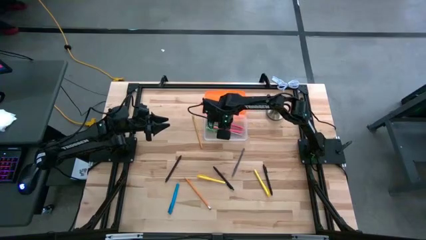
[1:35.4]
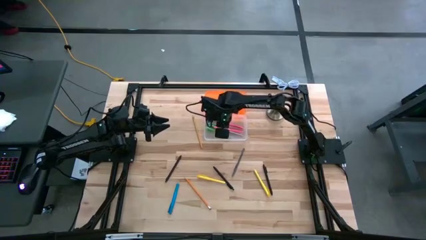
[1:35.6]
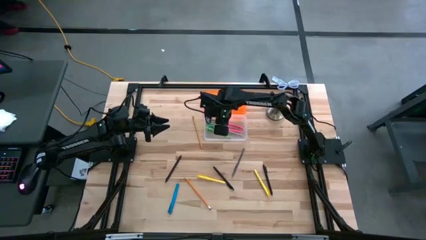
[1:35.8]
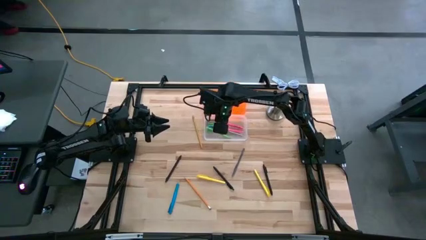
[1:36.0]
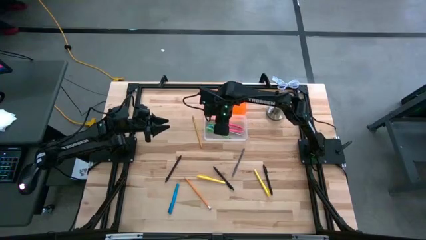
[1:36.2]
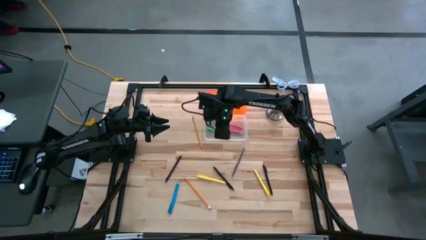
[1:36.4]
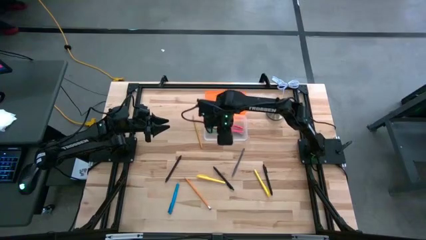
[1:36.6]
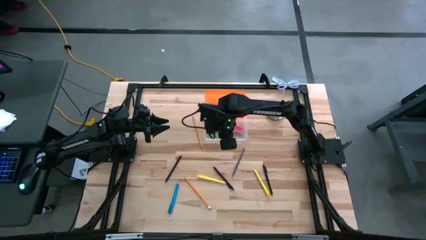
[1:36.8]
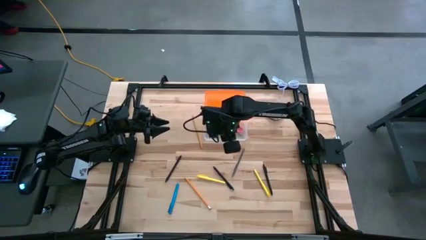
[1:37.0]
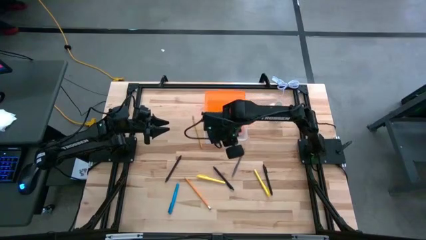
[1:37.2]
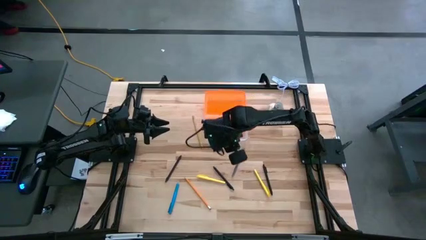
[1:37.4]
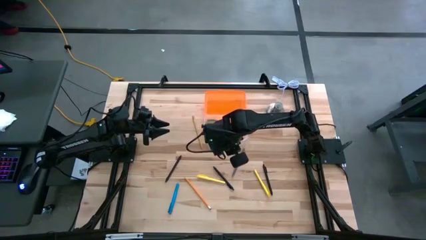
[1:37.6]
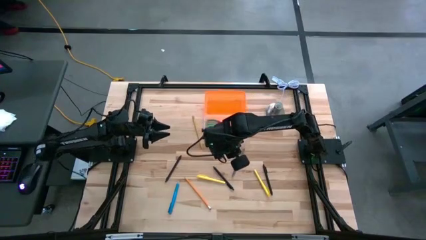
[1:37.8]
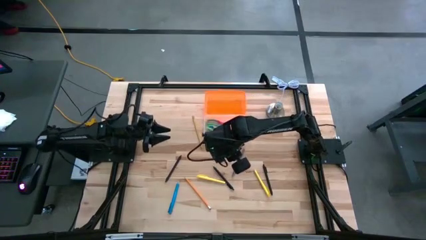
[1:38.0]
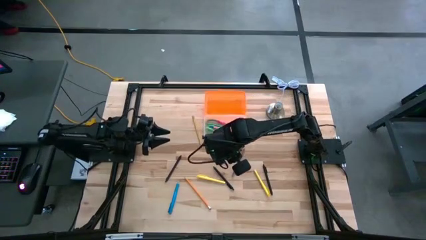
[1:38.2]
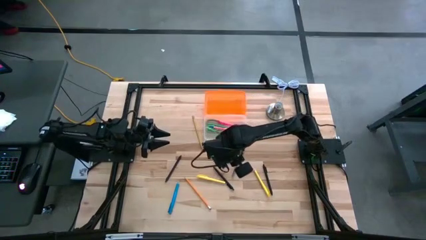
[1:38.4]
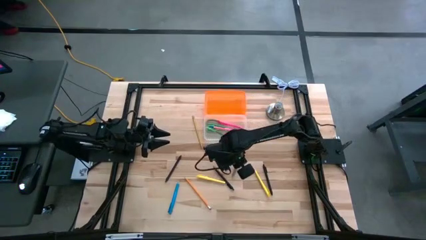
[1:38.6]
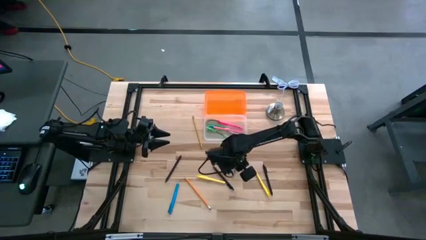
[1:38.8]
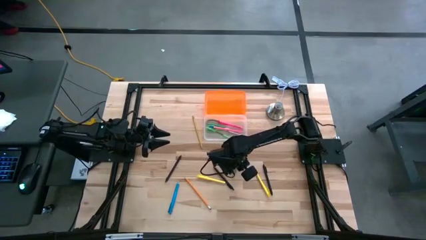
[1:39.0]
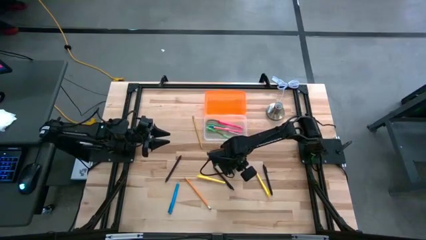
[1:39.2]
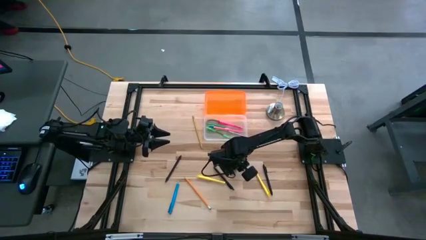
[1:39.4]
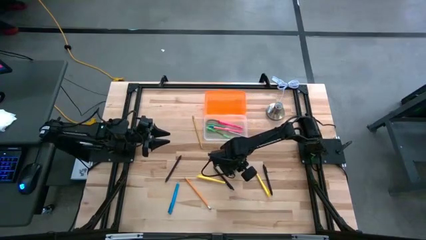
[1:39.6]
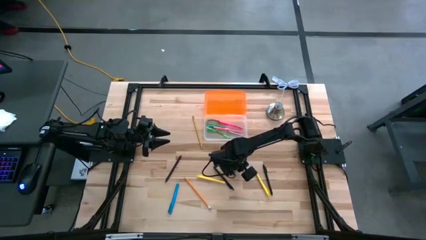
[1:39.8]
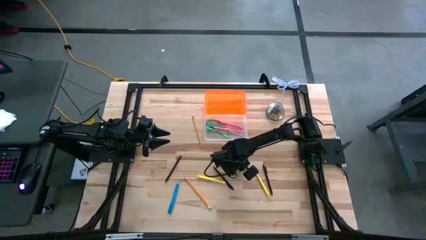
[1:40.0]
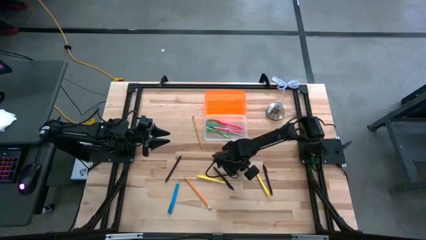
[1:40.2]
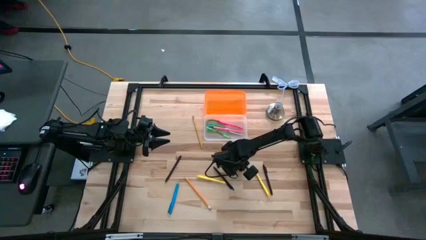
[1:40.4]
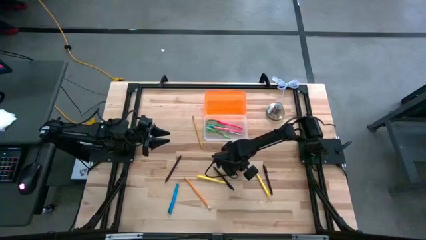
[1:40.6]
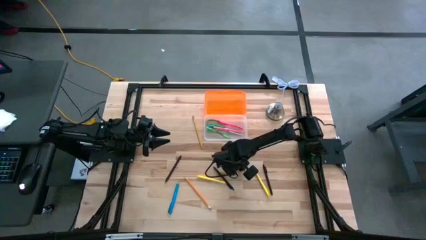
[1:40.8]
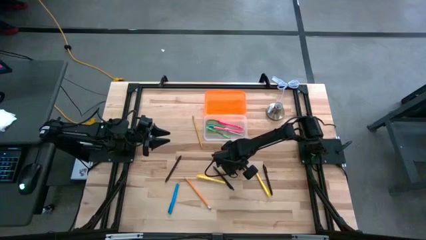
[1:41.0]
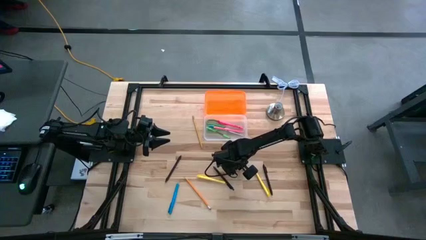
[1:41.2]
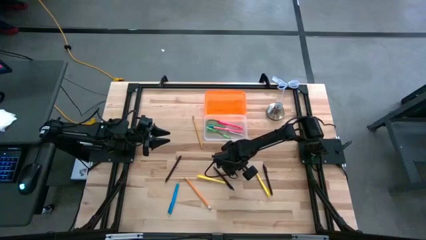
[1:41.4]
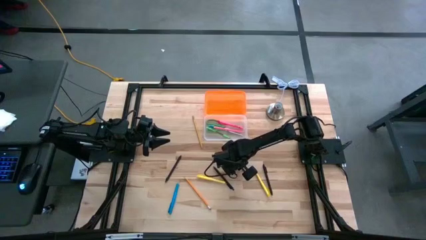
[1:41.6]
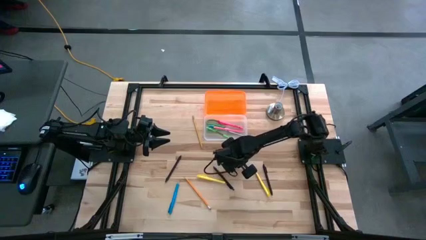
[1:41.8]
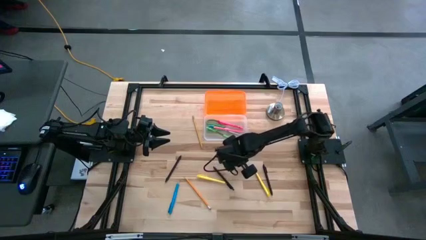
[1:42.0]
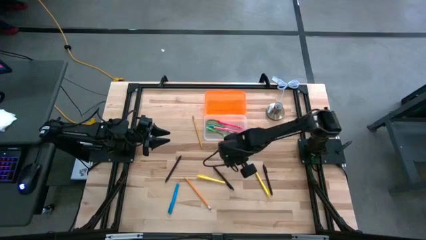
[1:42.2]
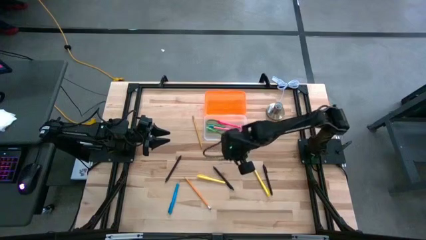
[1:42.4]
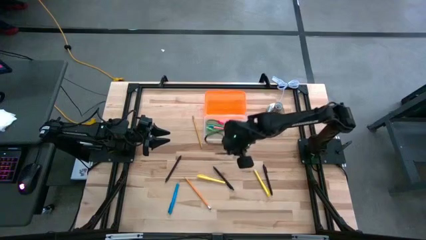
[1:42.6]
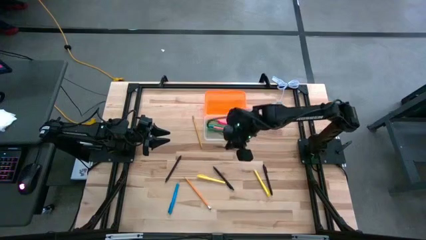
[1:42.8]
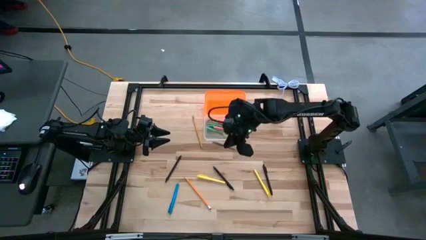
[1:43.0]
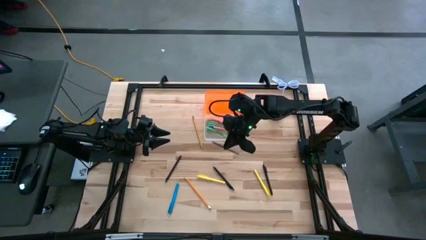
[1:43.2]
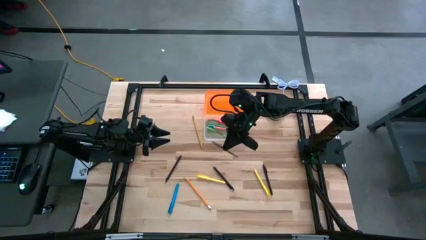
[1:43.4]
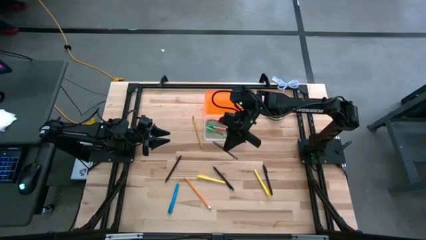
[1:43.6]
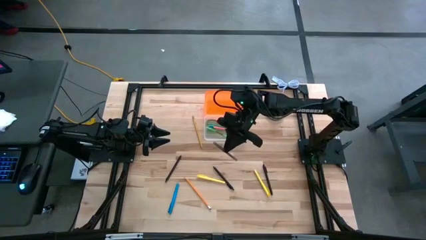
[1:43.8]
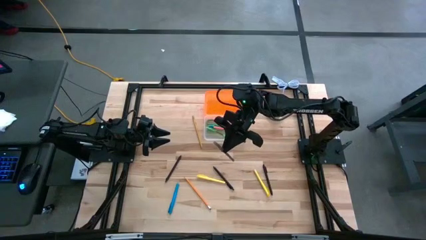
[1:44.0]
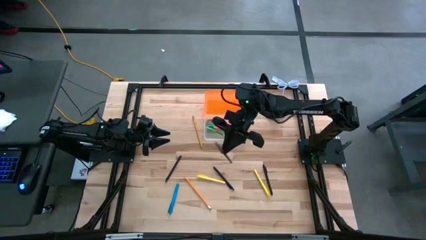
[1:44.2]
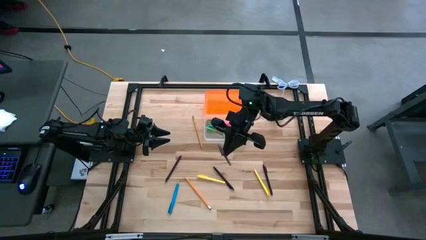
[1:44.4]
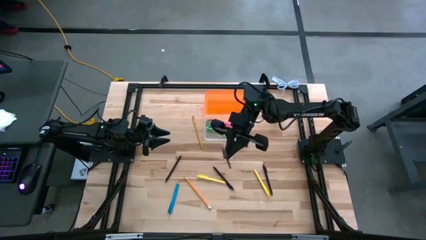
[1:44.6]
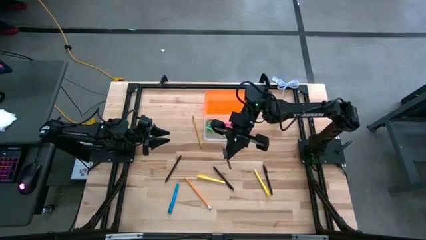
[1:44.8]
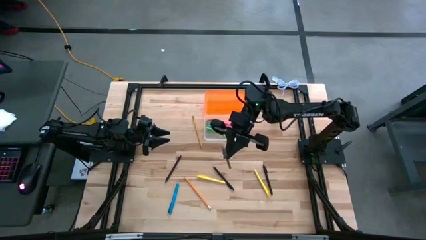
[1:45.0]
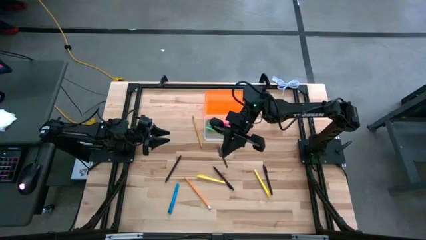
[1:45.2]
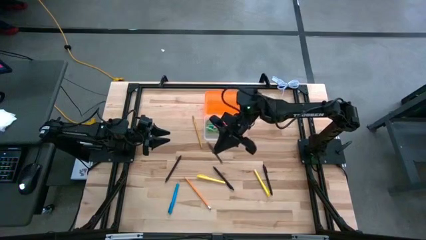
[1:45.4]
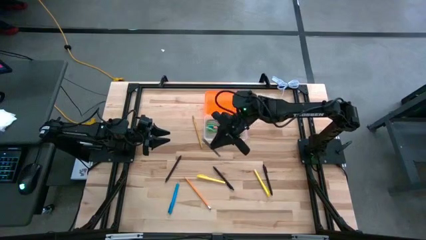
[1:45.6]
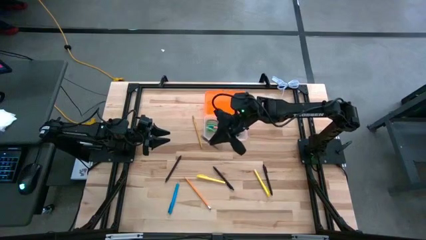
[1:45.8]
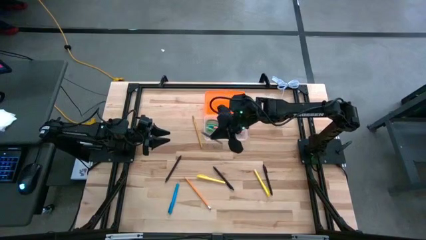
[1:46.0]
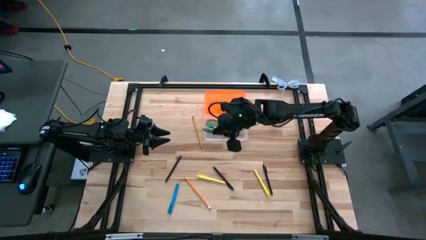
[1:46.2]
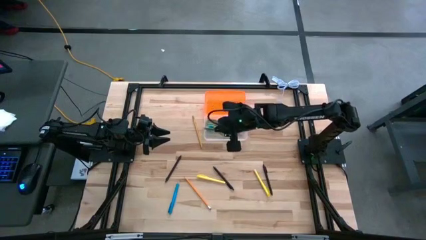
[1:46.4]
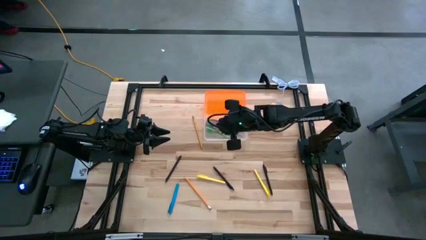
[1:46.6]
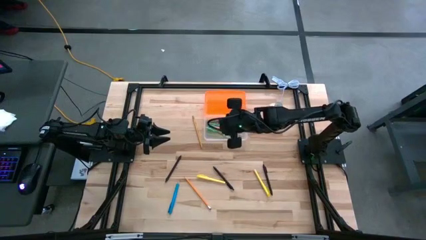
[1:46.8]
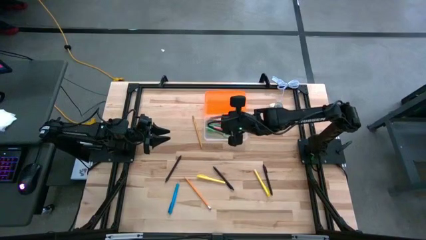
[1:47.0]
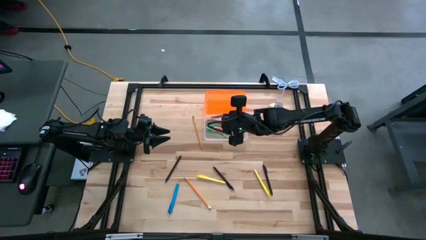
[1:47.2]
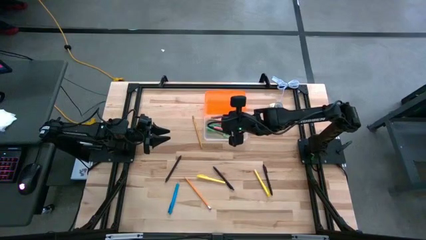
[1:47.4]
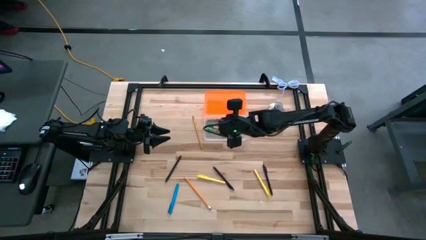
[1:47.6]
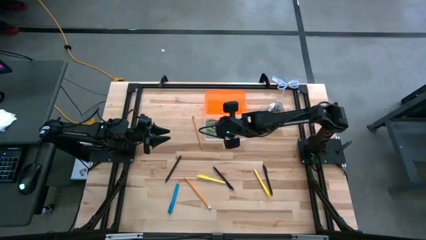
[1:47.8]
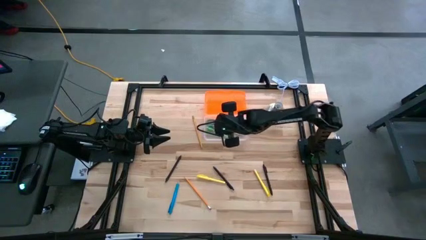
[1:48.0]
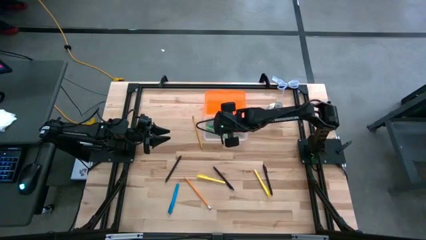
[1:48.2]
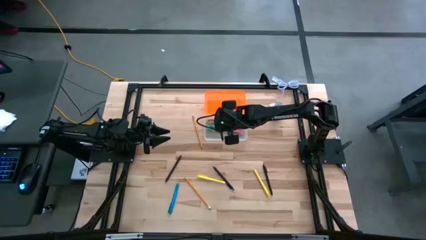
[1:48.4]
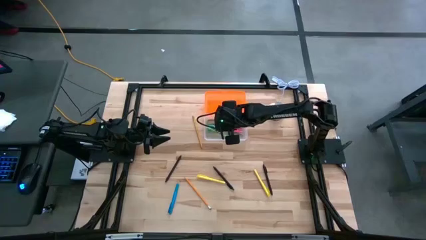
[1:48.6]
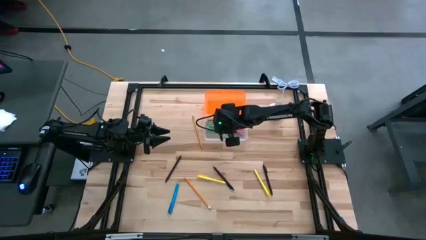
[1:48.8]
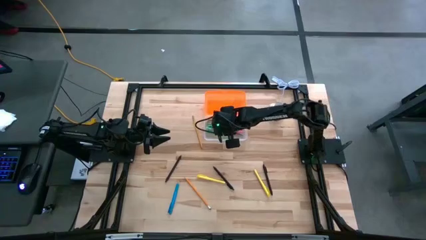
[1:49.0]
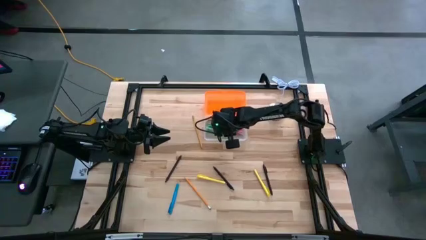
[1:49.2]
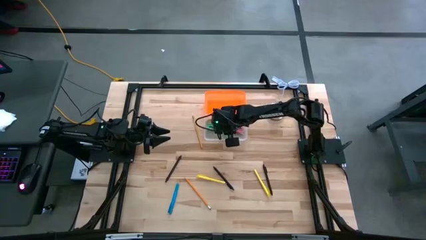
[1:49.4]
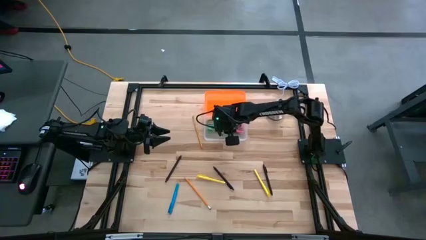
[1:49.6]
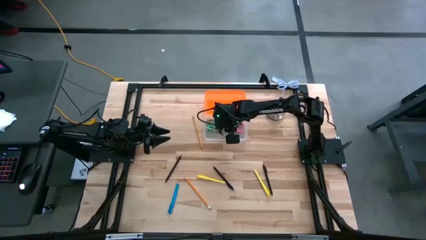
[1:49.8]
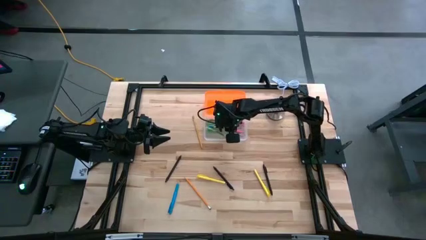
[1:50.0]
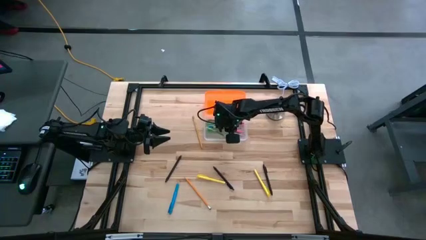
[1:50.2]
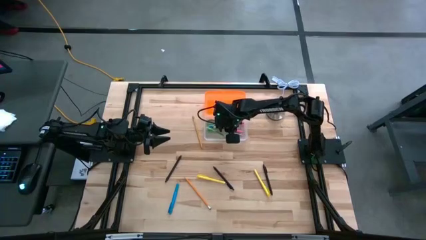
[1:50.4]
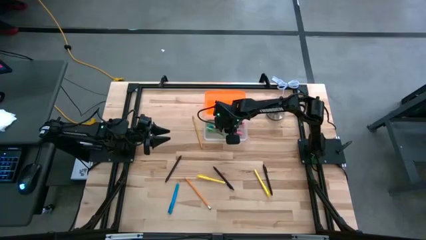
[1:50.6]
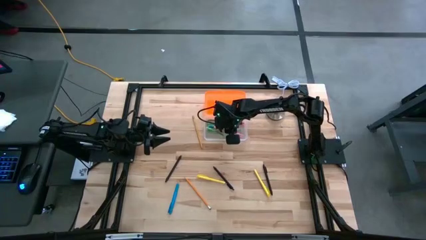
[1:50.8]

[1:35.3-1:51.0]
Task: Pick & place school supplies into a supply box
Put the gray pen into the supply box

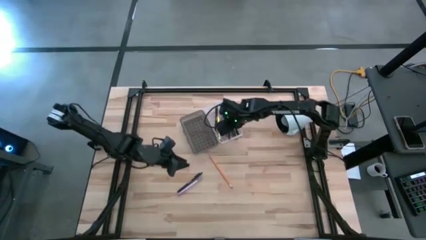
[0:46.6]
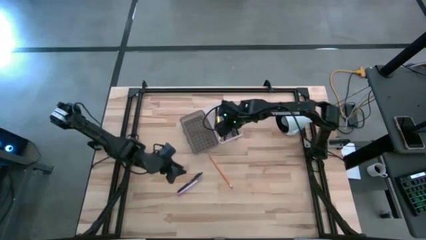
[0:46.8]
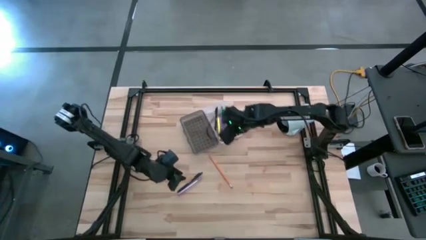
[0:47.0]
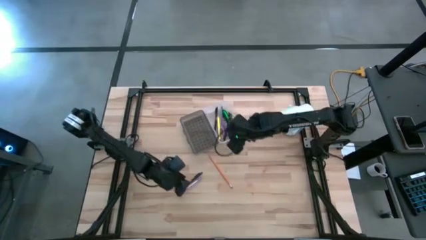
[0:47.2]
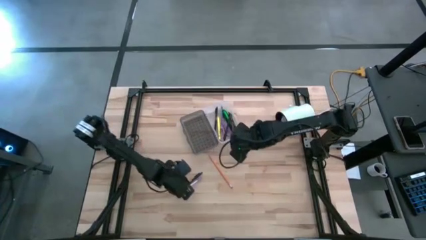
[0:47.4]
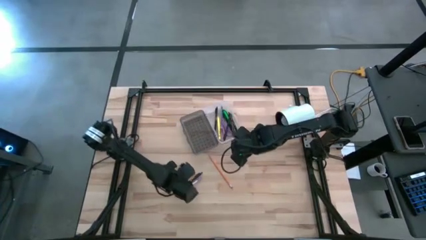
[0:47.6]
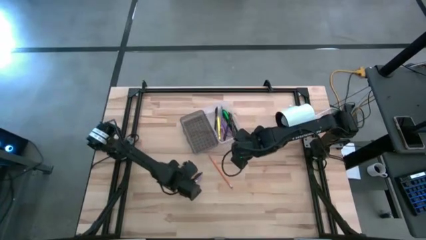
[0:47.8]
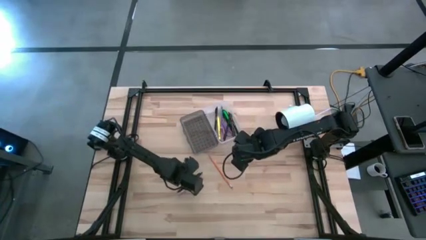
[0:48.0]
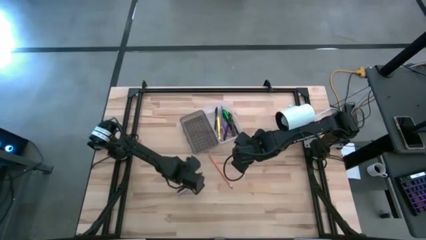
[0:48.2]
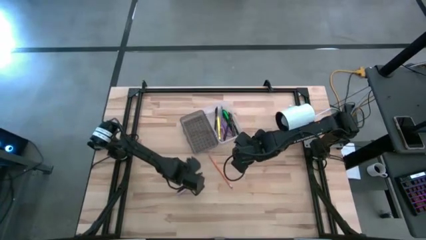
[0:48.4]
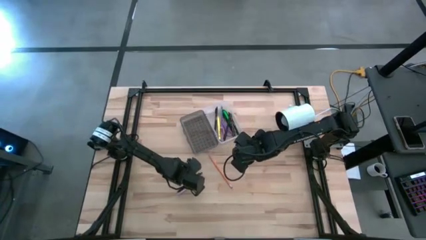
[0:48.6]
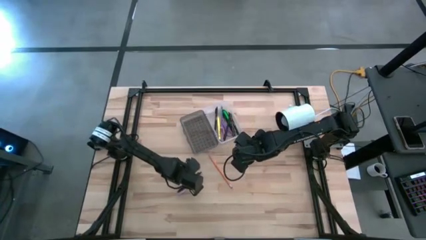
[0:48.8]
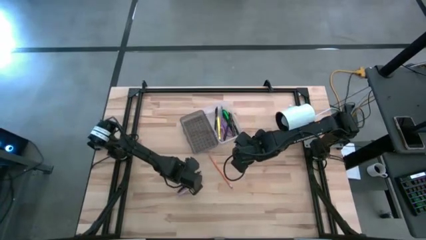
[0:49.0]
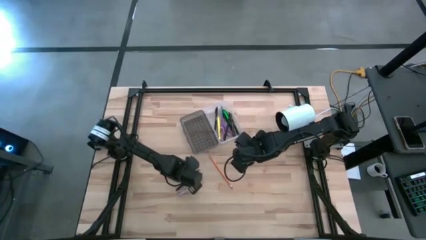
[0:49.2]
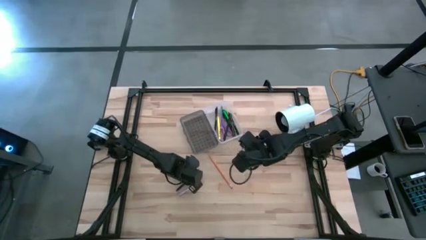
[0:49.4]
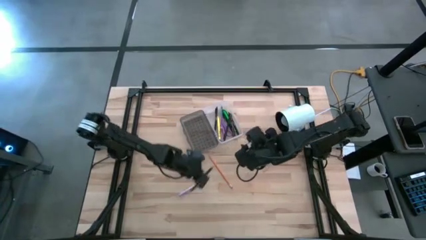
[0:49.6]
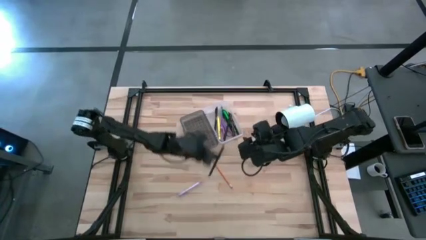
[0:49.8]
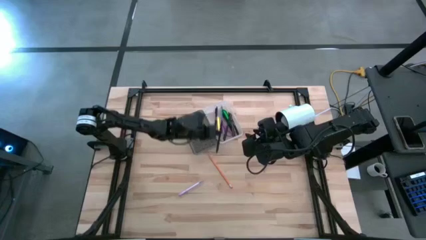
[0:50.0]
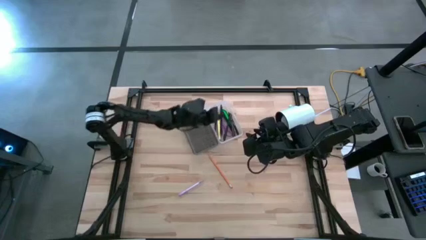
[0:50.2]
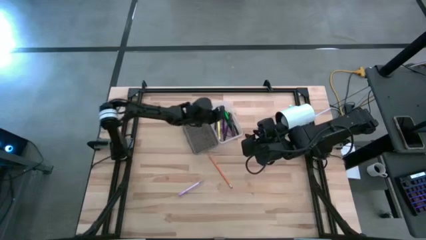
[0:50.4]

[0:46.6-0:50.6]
Task: Pick & place school supplies into a supply box
Put the black pen into the black supply box
